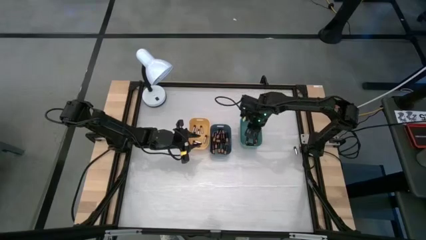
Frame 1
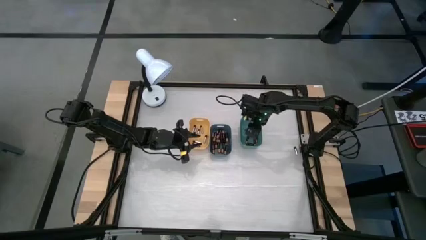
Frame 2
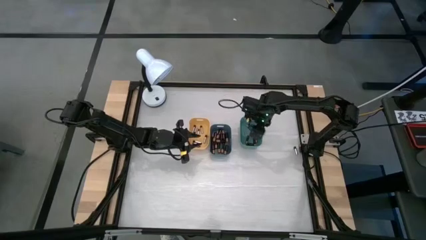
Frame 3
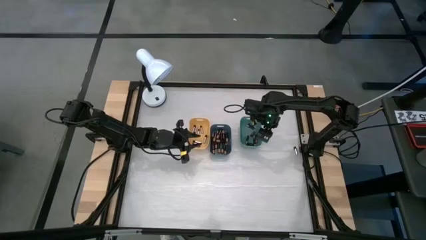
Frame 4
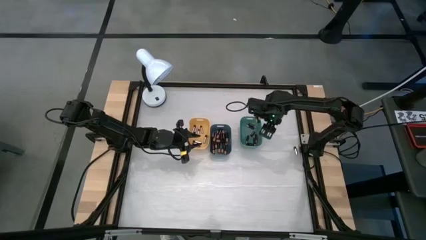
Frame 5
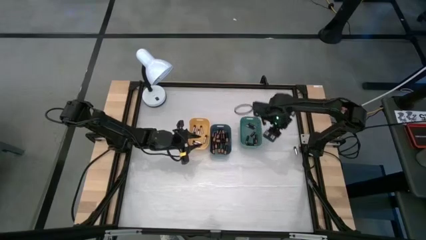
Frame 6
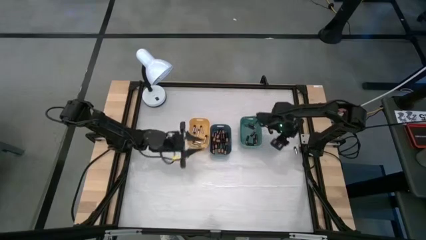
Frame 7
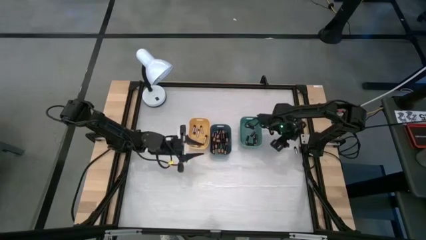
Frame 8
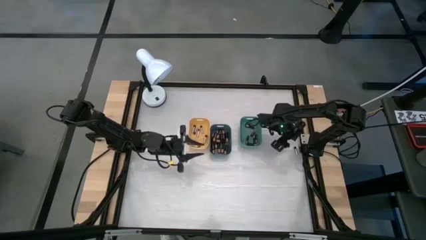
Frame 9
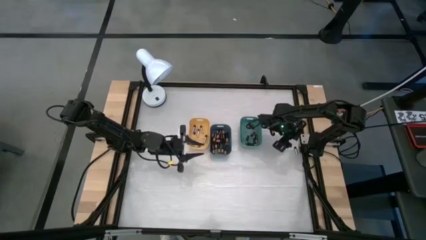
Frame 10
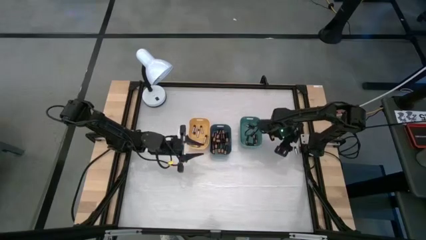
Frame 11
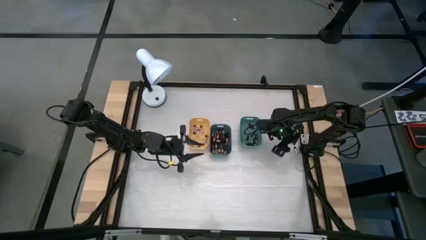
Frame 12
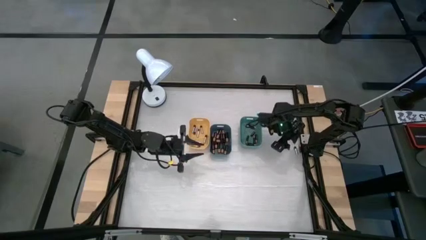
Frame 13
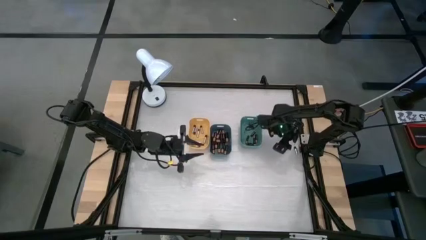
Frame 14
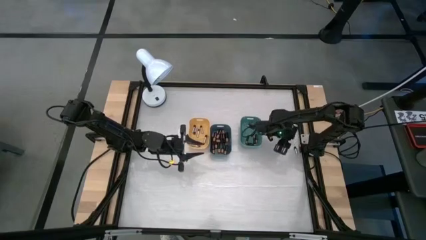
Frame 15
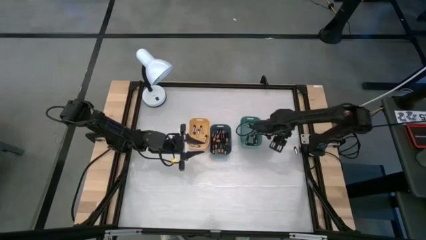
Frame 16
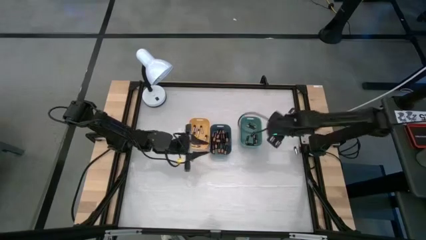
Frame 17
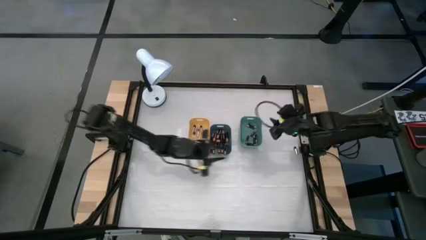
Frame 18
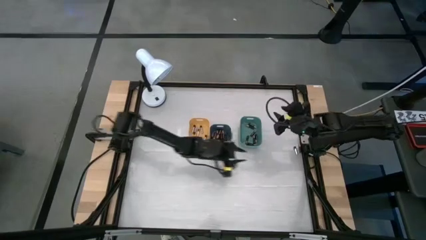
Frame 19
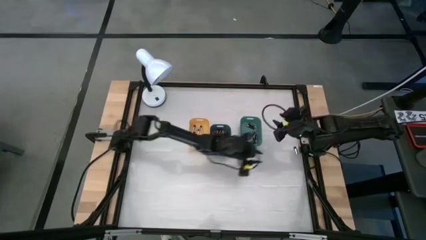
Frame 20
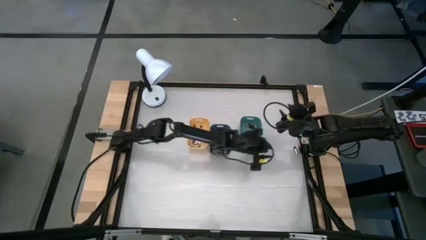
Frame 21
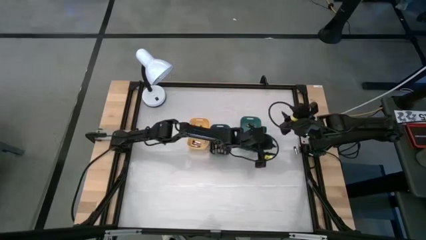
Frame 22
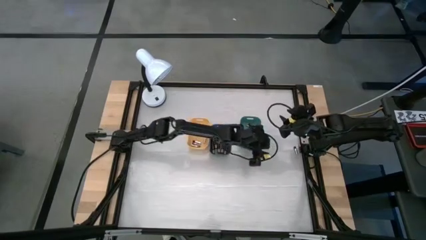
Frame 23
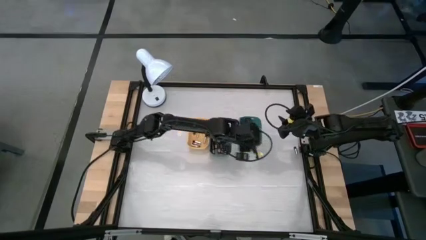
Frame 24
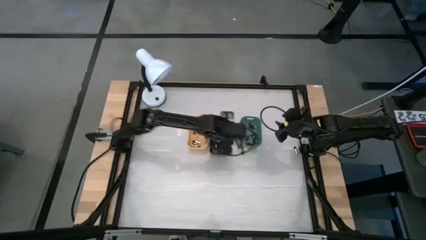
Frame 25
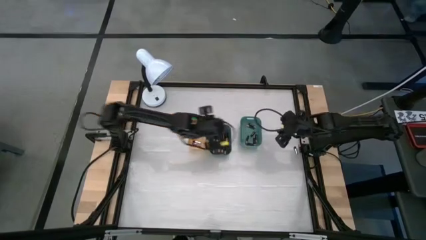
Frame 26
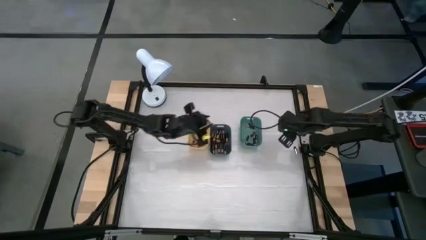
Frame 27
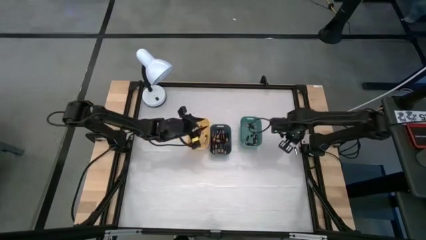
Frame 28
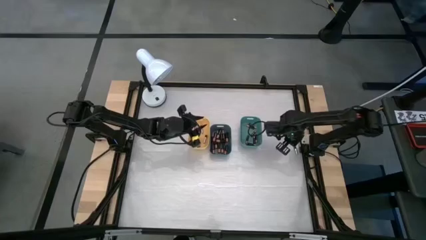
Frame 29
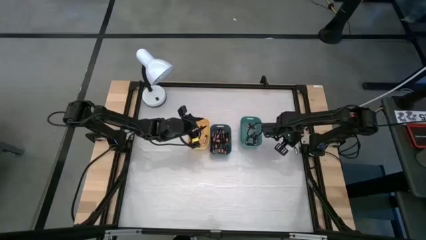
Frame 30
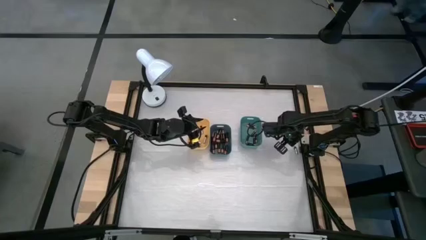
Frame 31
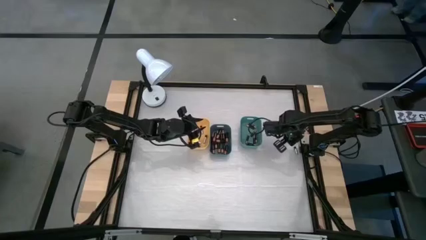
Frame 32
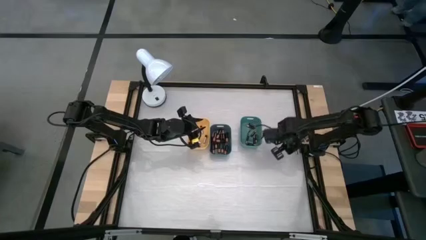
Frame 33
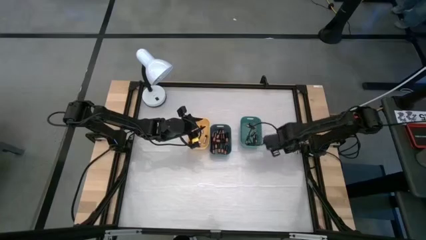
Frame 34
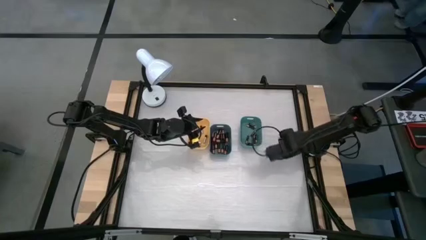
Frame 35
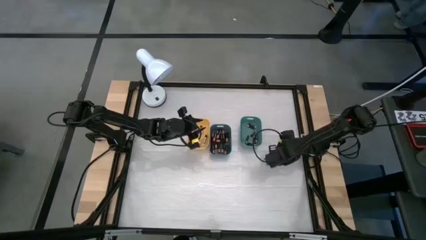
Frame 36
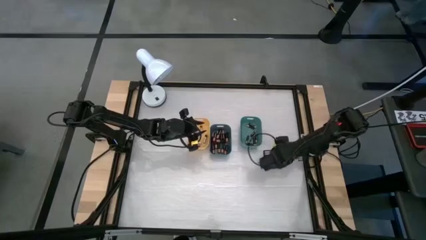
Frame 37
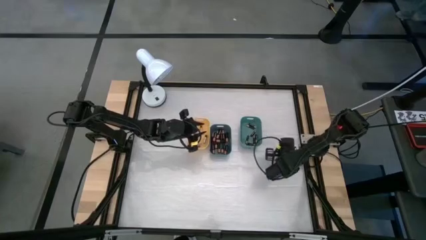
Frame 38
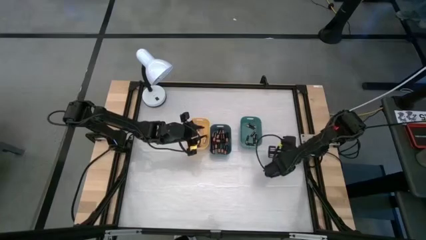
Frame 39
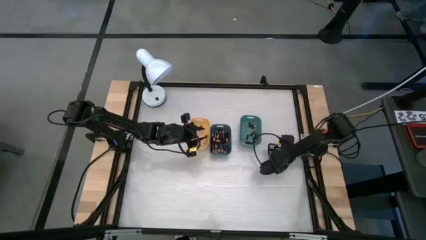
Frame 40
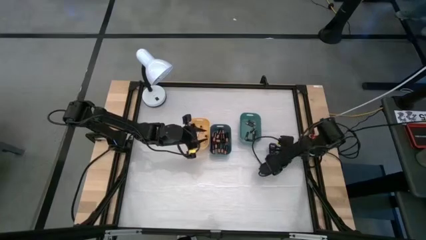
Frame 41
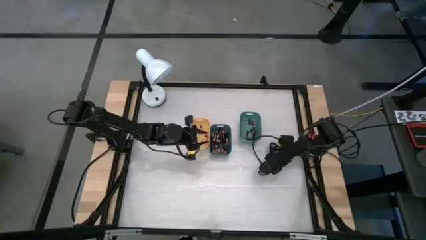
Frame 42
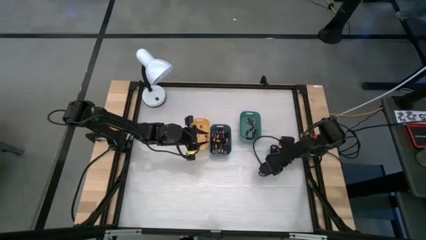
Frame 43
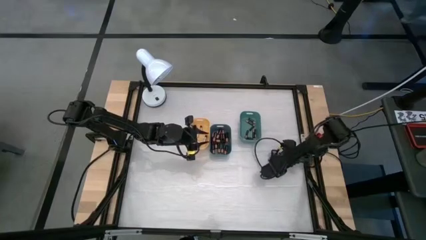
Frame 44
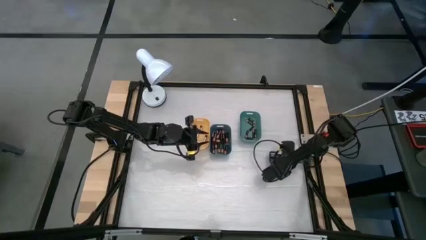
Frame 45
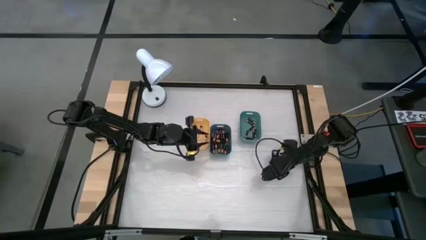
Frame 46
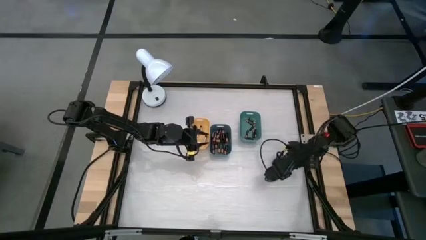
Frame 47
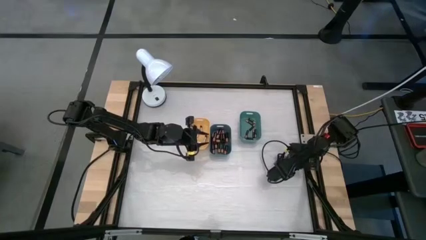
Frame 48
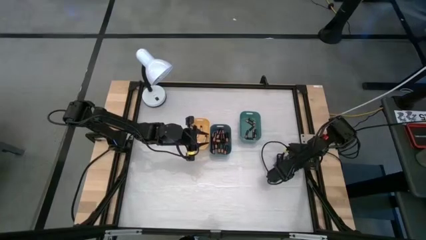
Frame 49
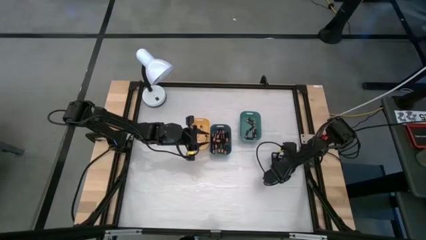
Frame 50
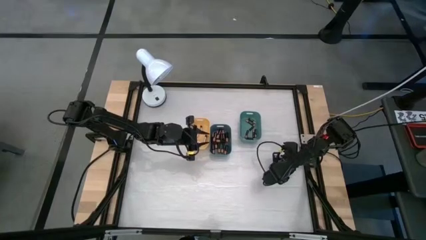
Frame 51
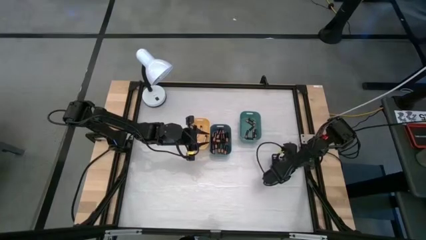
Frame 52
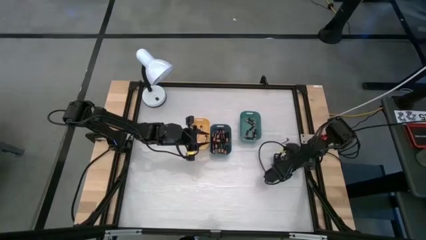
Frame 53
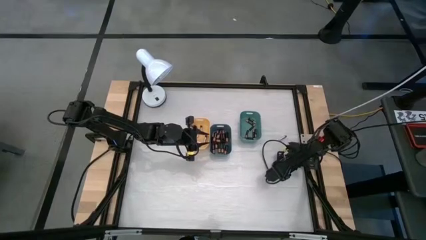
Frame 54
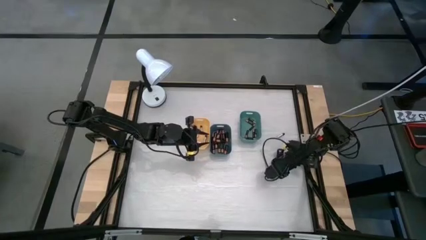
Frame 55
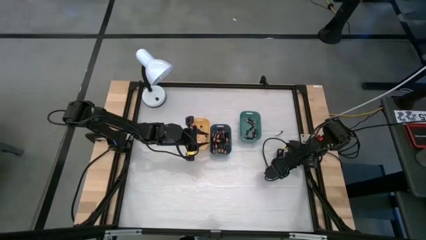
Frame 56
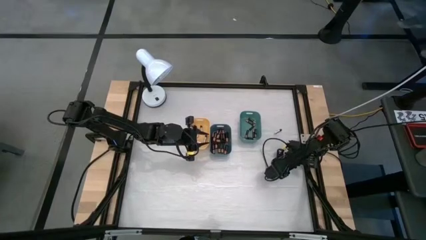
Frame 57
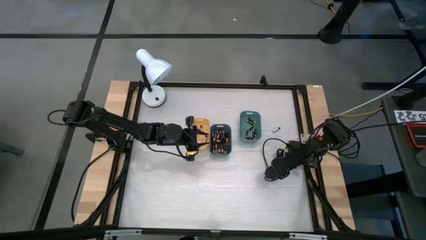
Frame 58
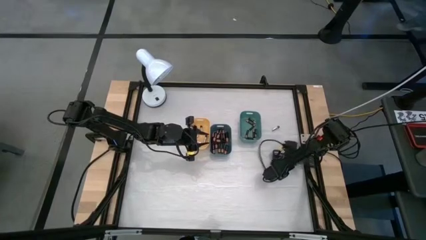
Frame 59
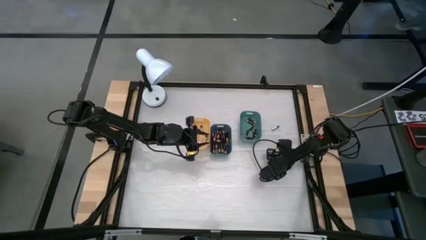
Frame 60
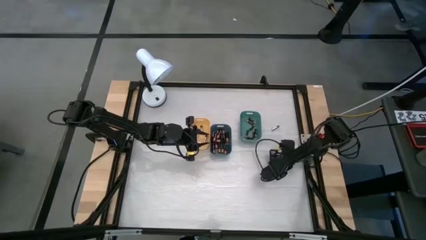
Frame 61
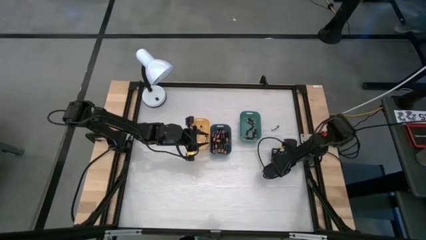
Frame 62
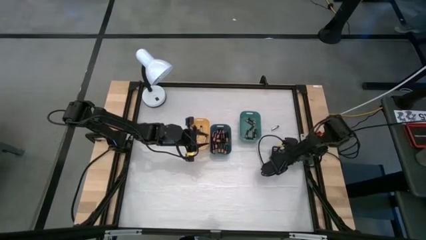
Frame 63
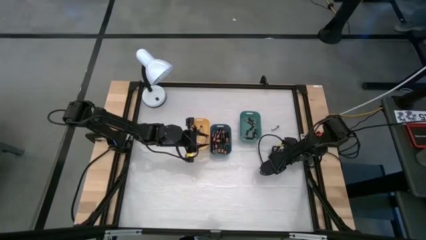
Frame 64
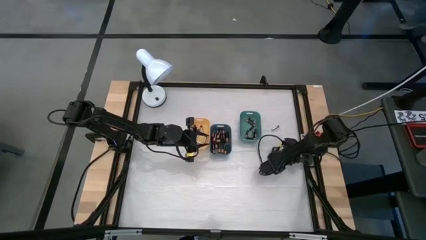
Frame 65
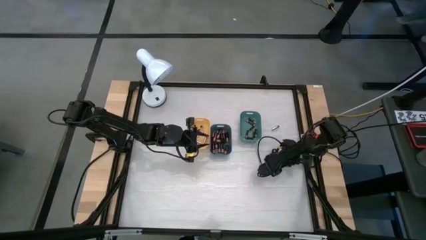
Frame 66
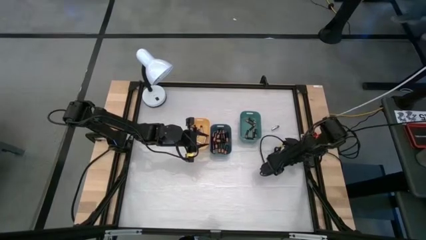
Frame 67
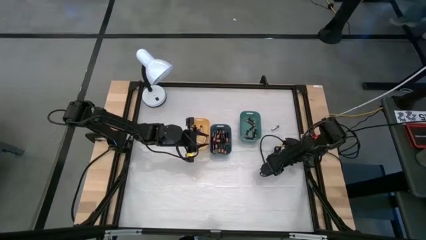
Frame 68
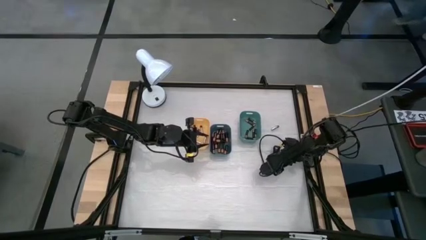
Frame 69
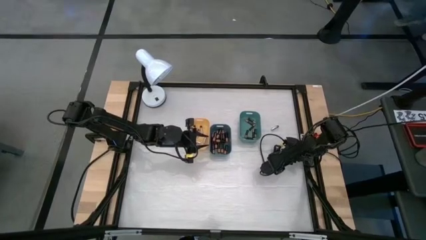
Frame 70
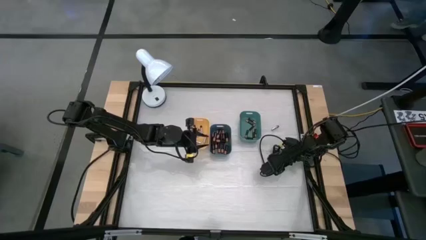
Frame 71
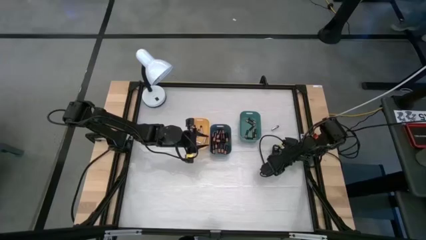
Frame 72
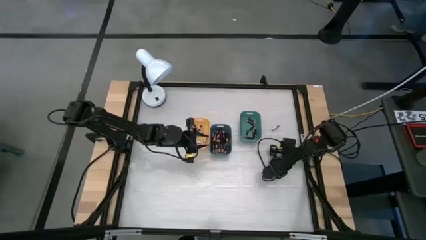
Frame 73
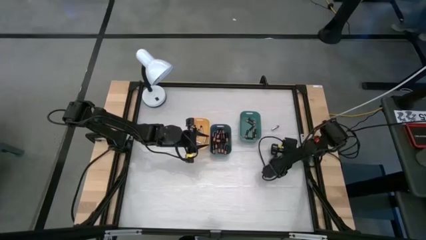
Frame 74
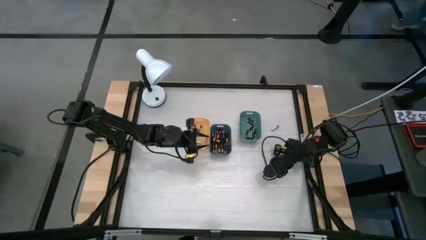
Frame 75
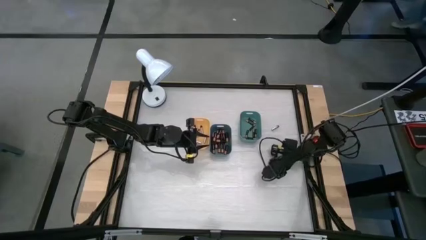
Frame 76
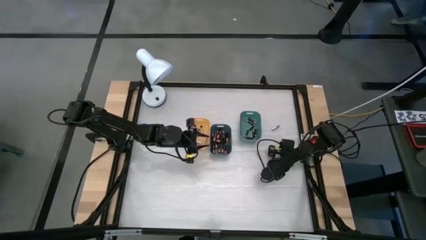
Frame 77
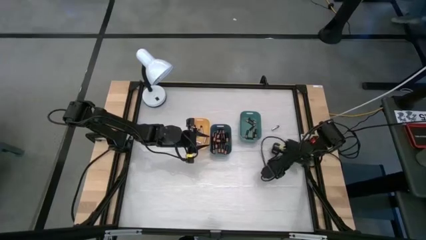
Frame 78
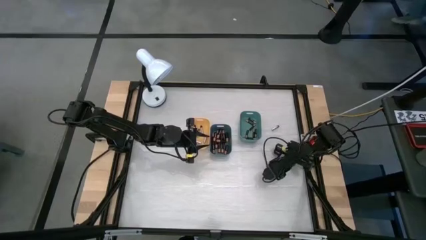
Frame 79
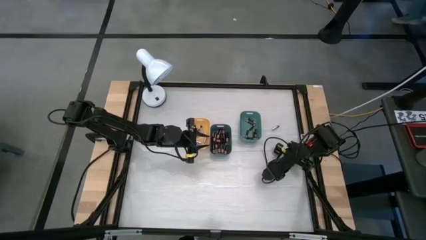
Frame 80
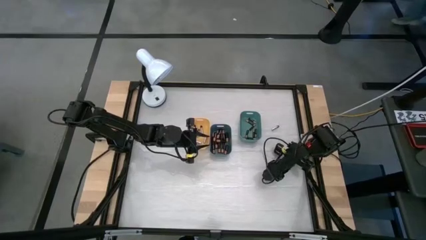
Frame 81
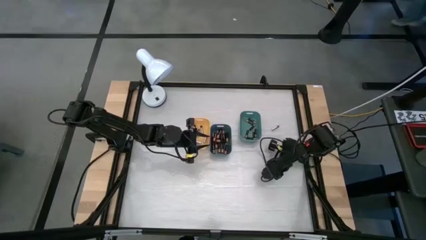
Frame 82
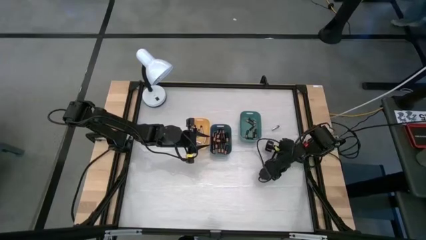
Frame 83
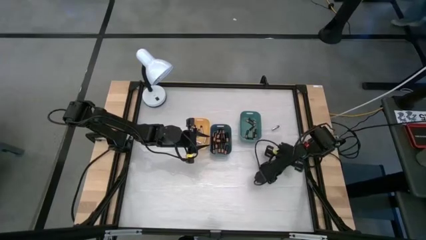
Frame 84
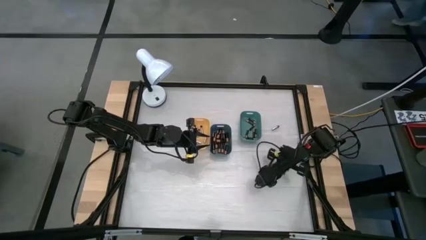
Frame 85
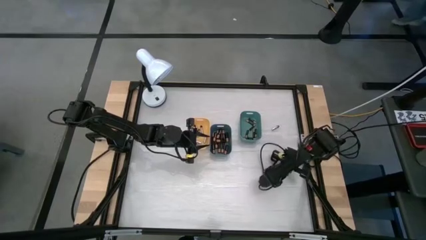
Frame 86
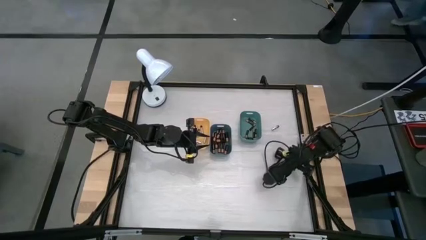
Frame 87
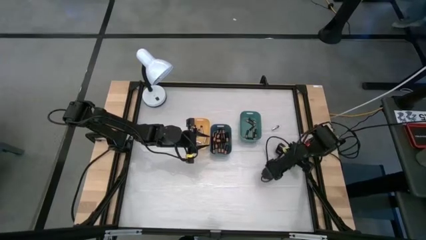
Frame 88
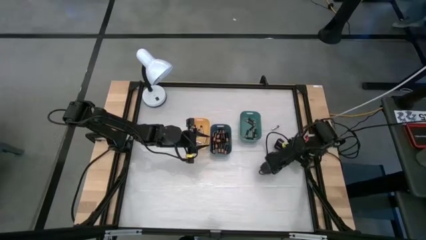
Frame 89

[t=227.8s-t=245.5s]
Task: Sort batteries
Adjust the batteries
